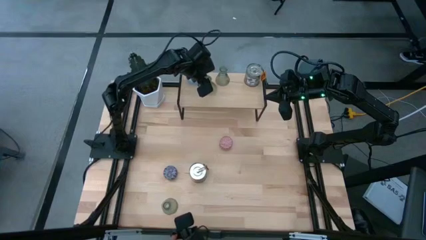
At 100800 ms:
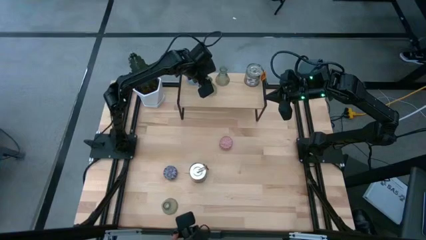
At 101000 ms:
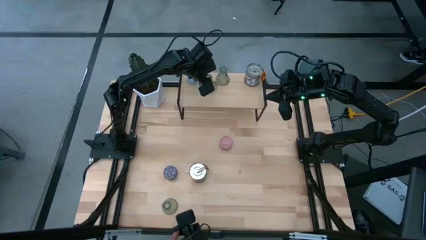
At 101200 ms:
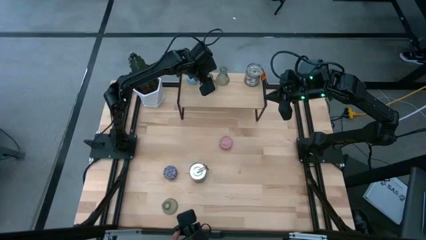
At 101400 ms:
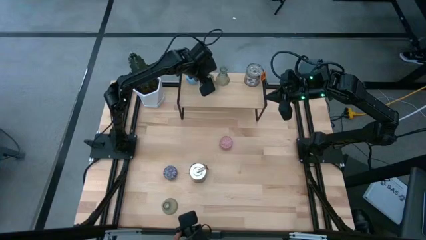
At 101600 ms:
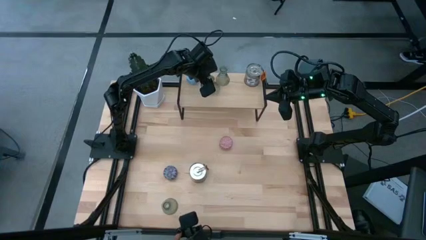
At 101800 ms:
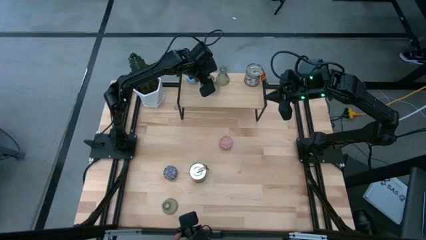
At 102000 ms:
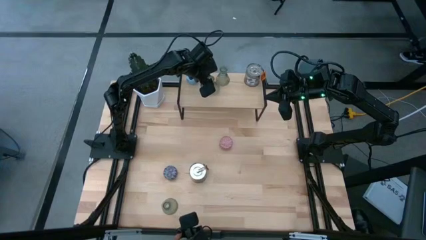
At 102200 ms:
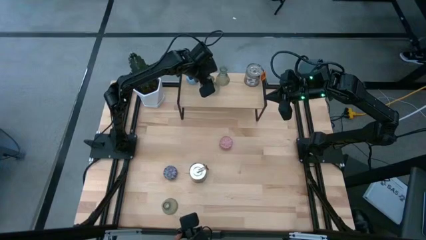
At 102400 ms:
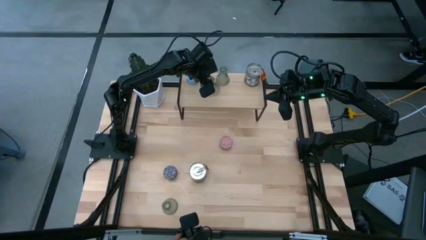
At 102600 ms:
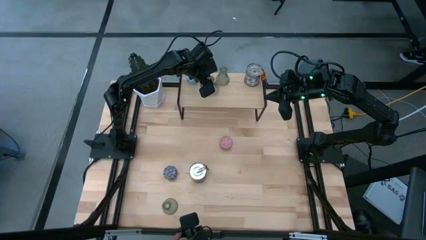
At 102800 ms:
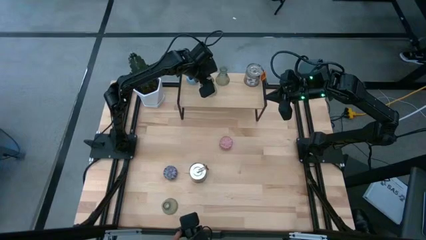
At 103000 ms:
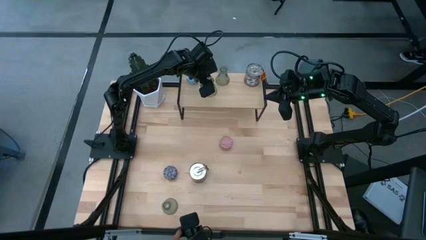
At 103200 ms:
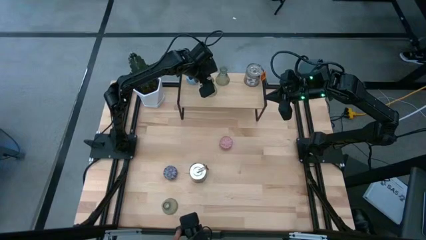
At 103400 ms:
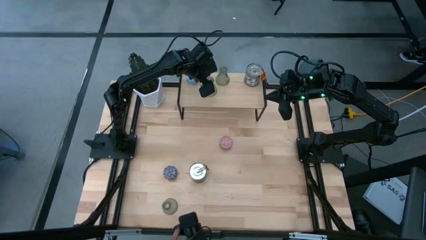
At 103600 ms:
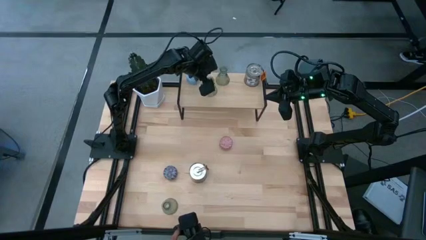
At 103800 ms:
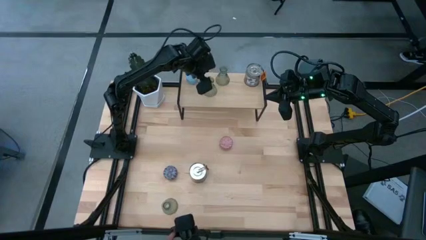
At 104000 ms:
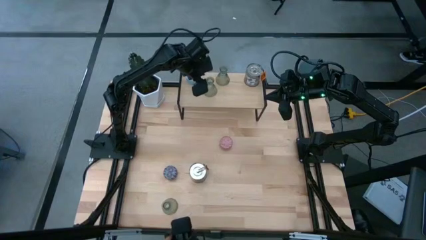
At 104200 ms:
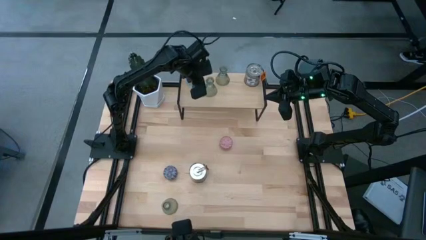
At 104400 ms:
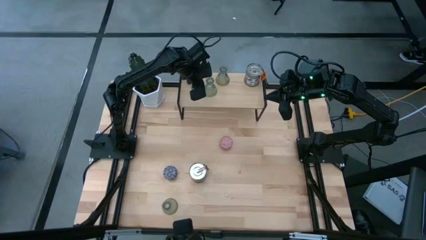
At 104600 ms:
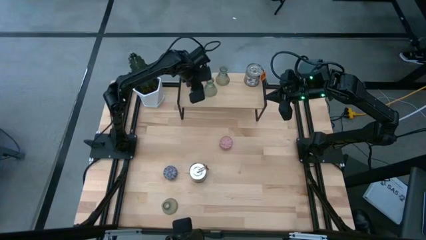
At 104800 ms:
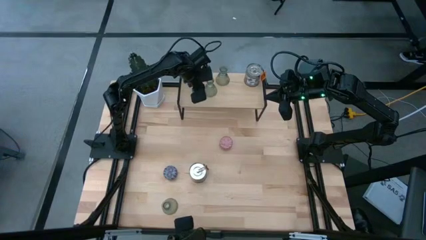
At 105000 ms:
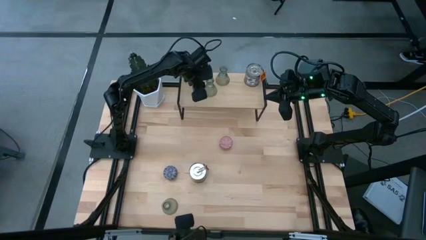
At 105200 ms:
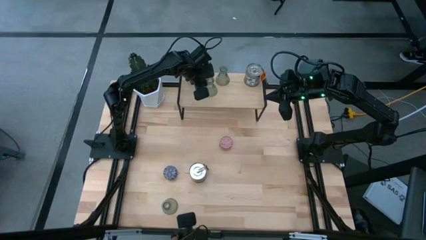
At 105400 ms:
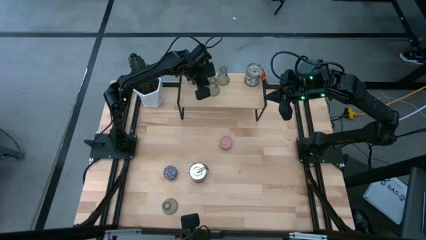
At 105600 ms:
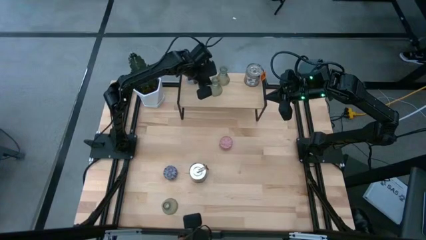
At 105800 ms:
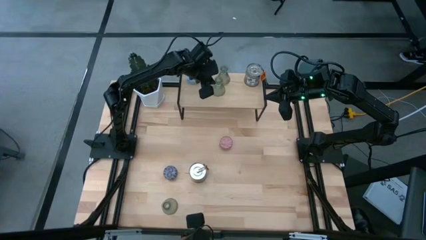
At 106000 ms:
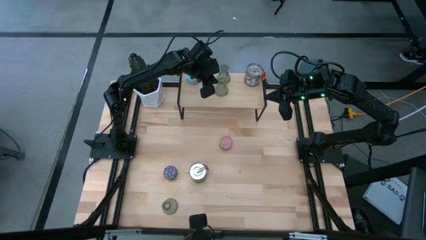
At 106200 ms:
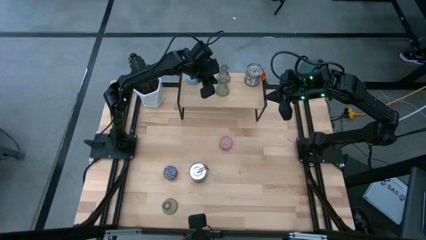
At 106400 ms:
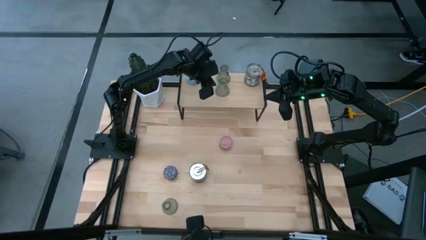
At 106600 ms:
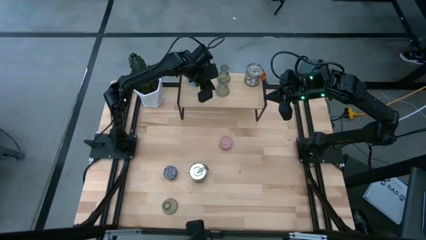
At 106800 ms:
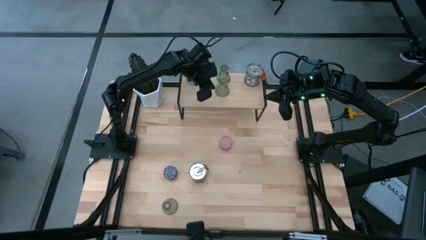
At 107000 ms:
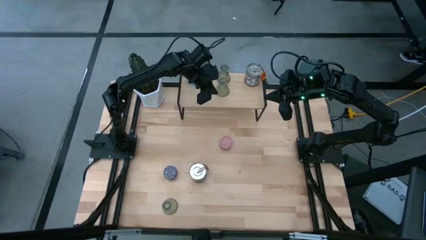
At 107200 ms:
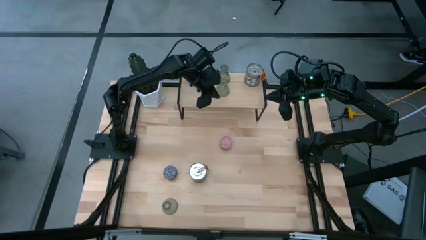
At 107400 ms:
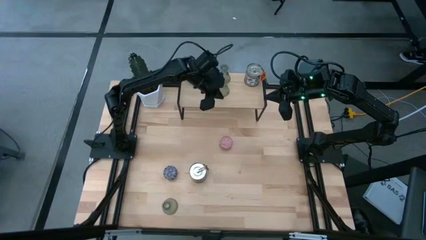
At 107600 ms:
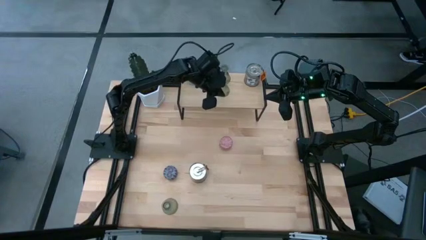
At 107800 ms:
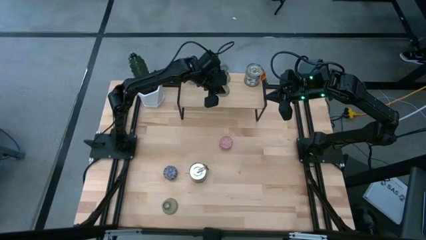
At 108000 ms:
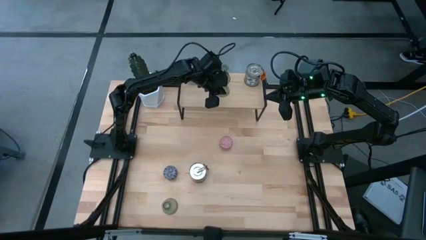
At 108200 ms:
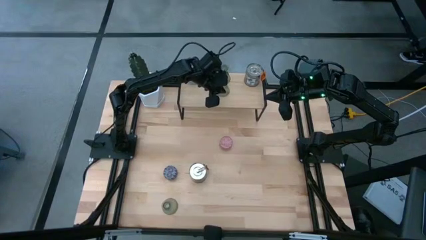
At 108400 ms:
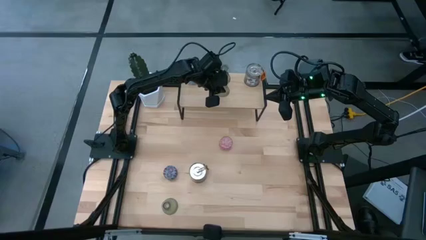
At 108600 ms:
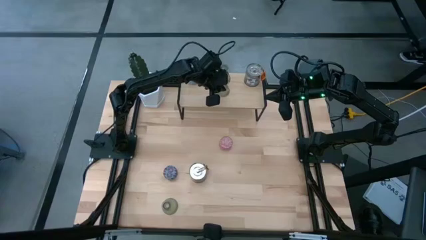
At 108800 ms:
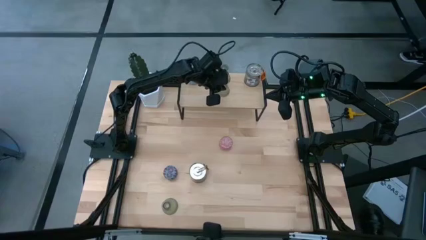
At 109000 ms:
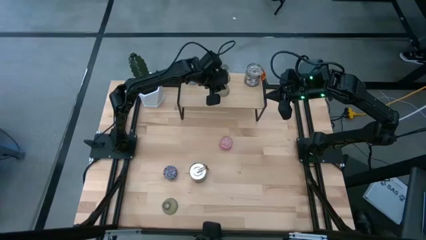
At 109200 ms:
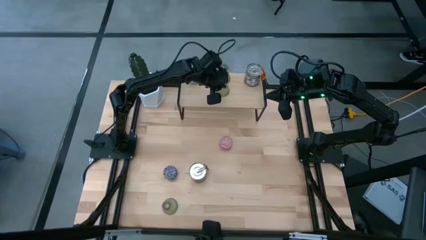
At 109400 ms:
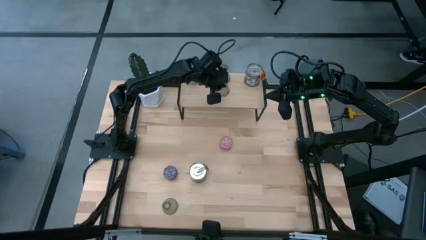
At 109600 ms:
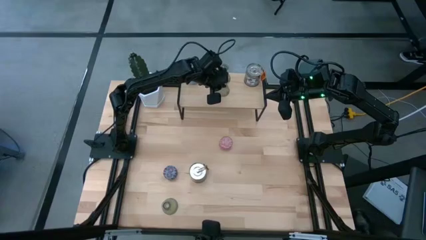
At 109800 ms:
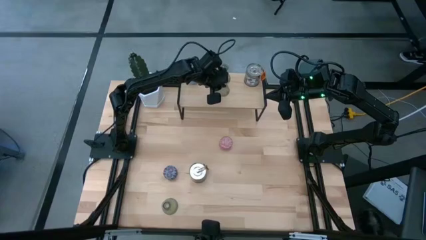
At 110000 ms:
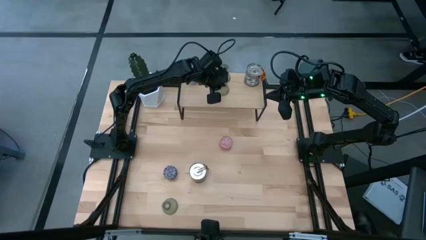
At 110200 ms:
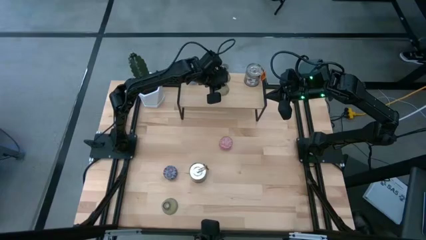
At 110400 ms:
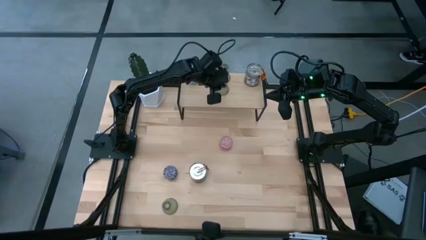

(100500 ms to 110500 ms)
Task: Pick & Place candle stick holders
Put the top green glass candle holder aligned with the green glass candle holder on the shelf
